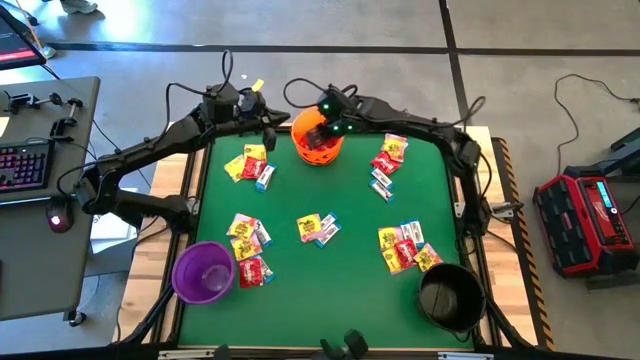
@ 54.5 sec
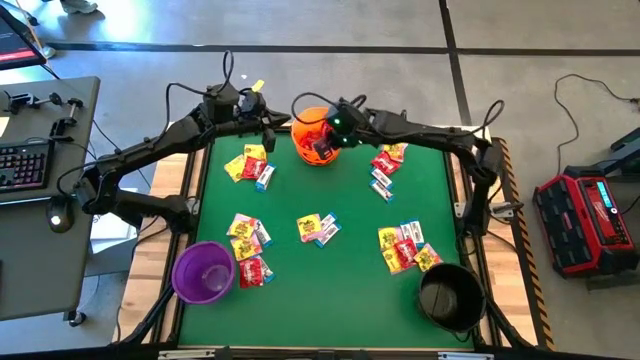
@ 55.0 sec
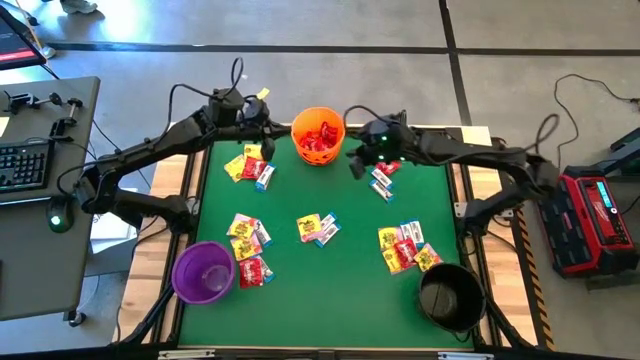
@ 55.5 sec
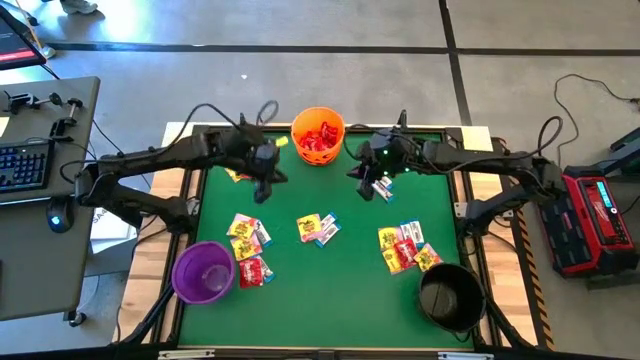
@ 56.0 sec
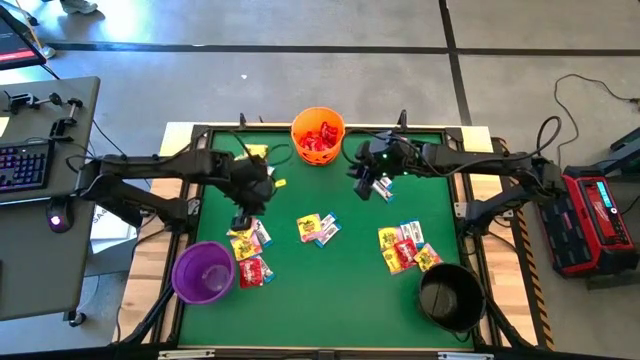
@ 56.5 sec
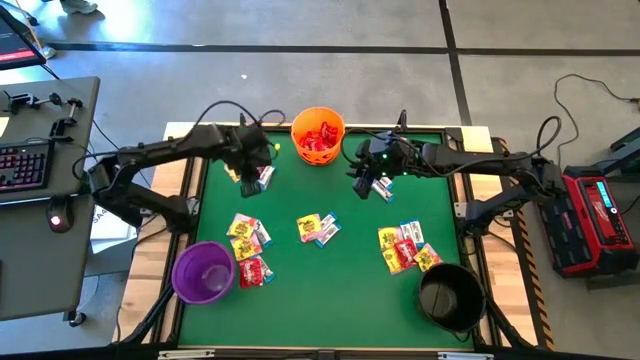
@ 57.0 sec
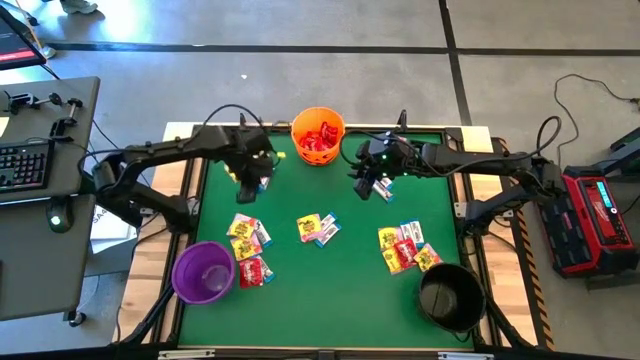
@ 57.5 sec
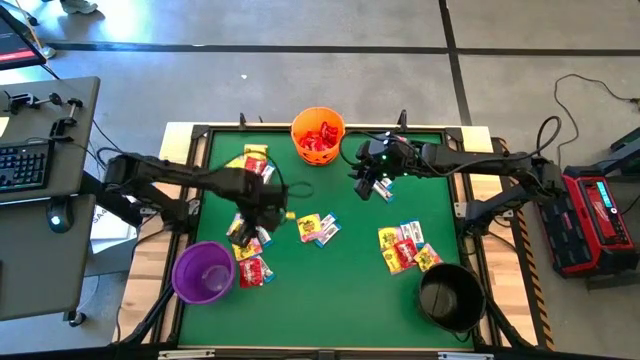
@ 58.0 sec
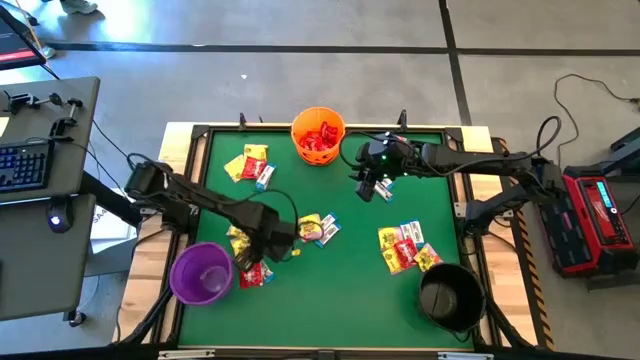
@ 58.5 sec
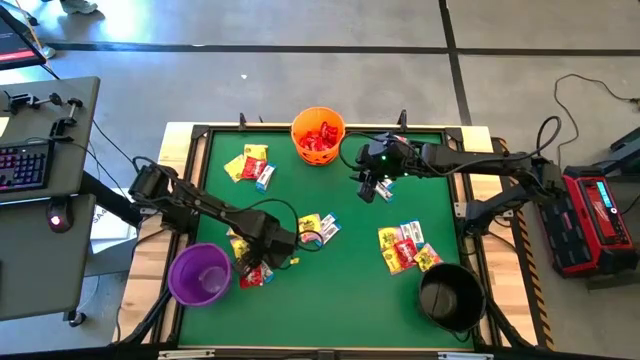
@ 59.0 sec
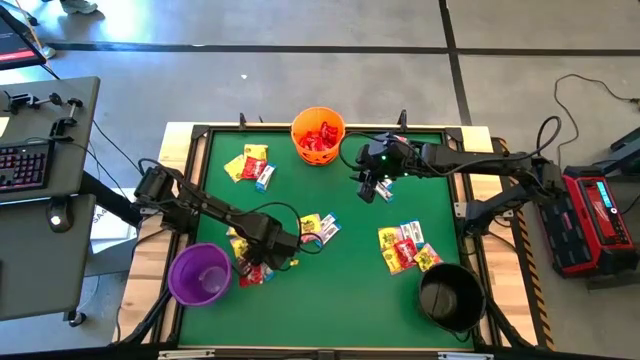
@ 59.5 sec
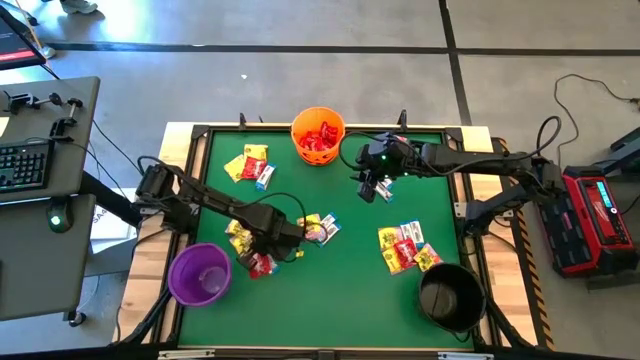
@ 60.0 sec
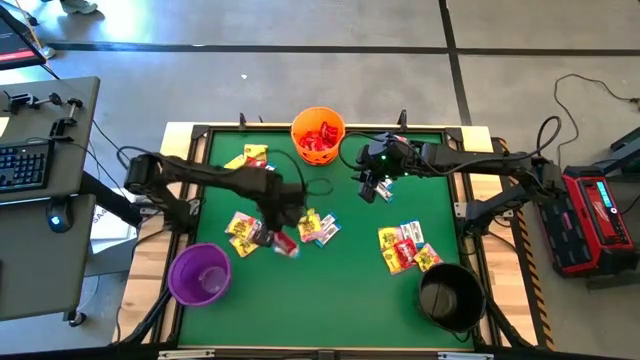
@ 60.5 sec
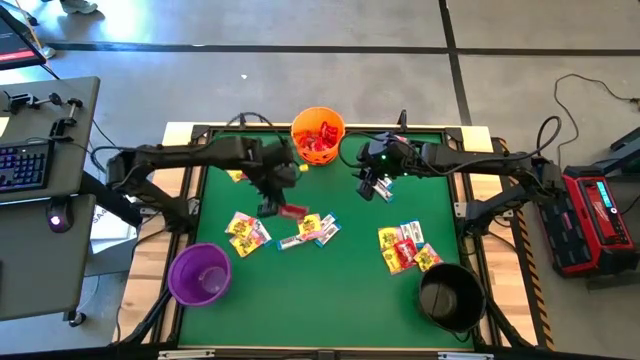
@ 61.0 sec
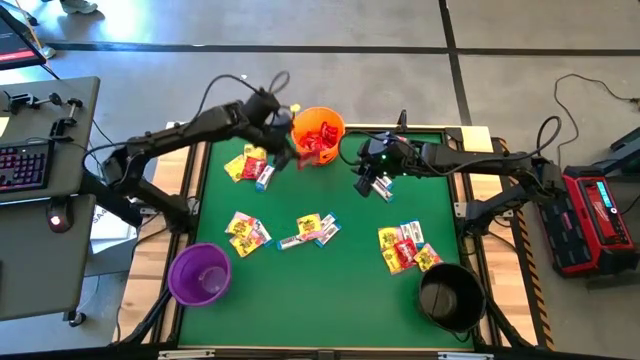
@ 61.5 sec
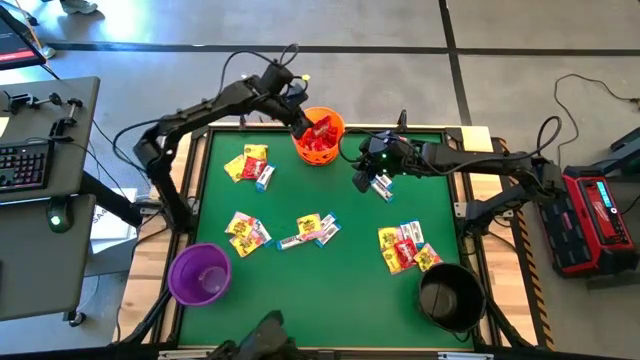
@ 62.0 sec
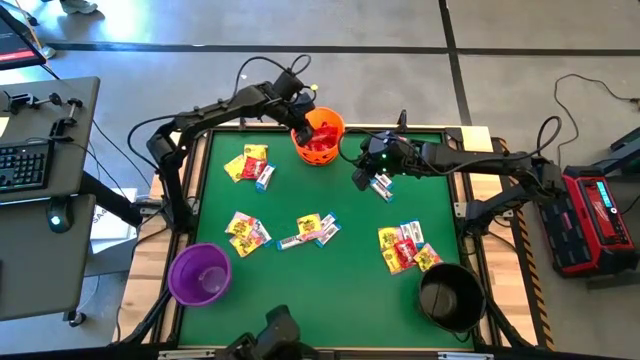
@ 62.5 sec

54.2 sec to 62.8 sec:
Task: Sort candy by brand, put in halloween buckets
Put the red candy into the orange bucket

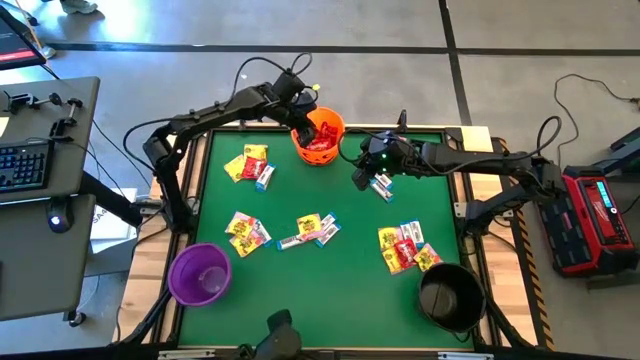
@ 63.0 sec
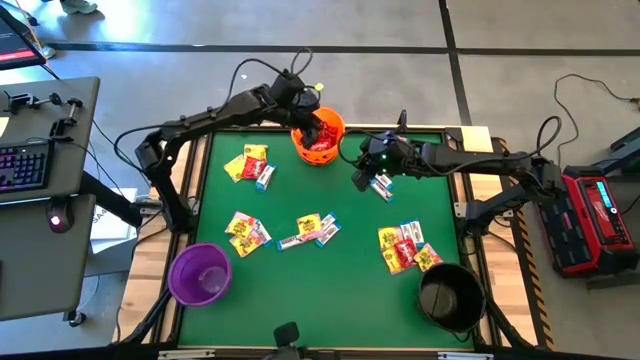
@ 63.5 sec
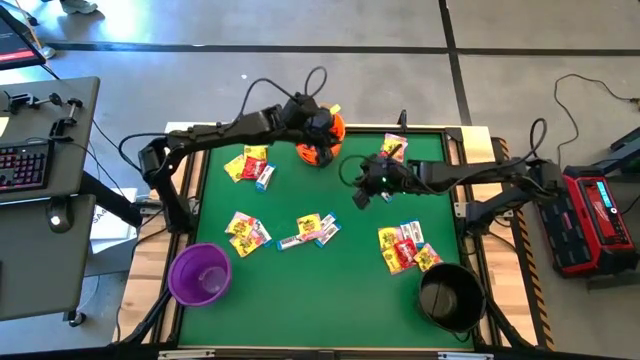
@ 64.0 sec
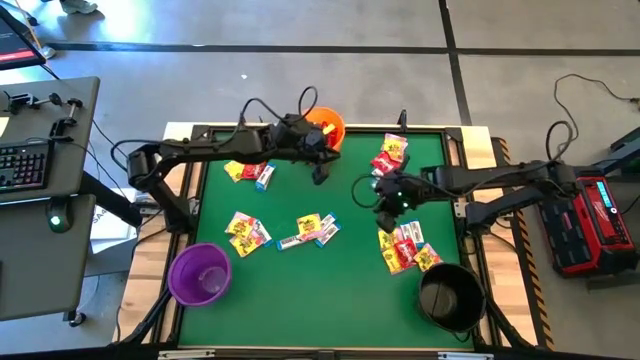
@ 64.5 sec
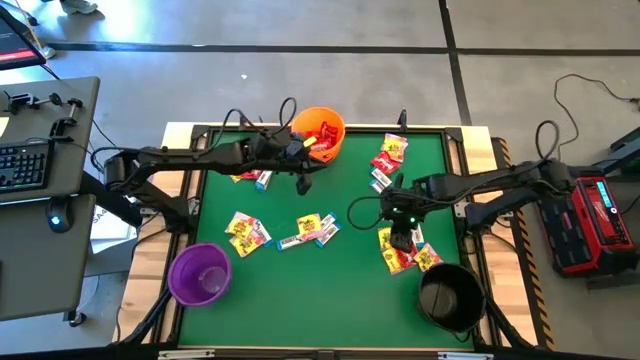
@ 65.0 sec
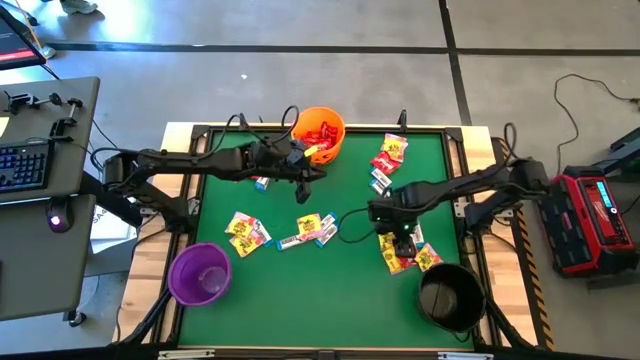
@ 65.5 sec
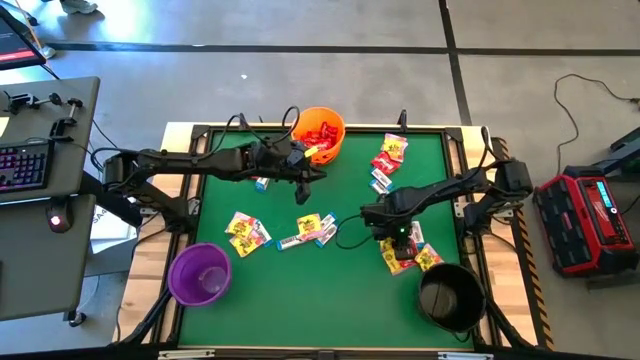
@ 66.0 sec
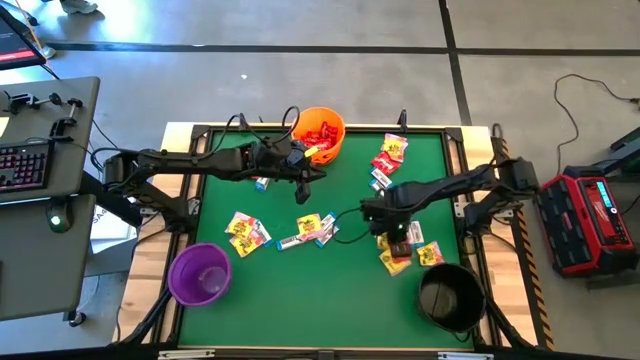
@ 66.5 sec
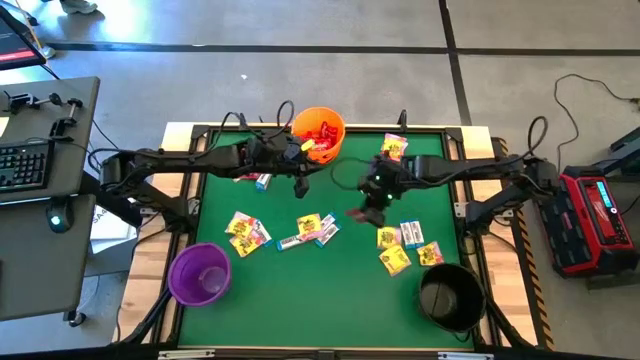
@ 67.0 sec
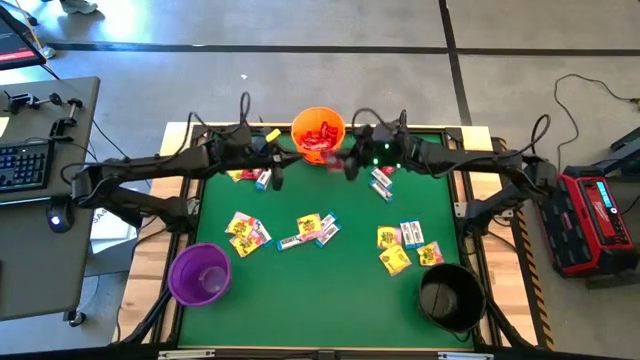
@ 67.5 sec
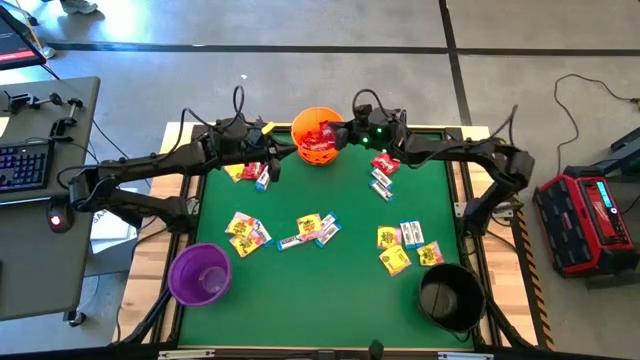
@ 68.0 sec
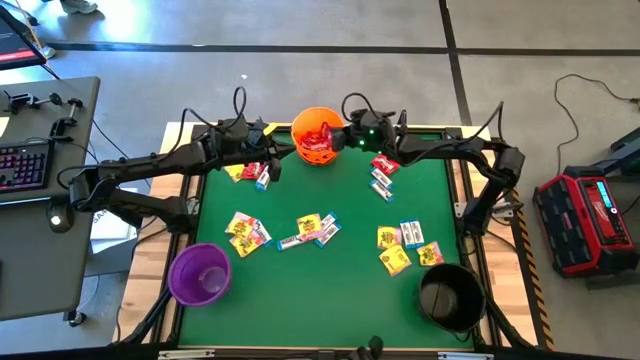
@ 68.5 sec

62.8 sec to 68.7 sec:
Put the red candy into the orange bucket

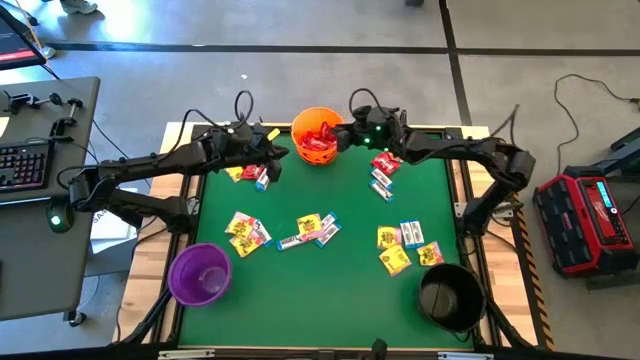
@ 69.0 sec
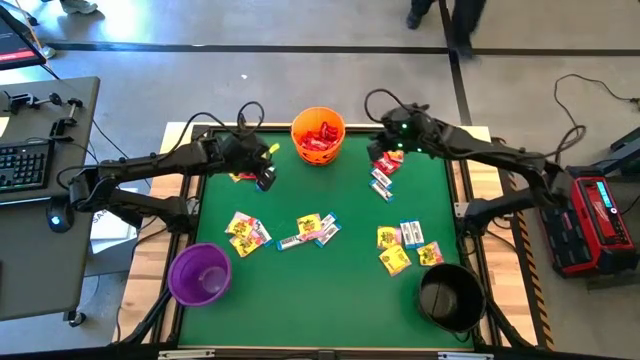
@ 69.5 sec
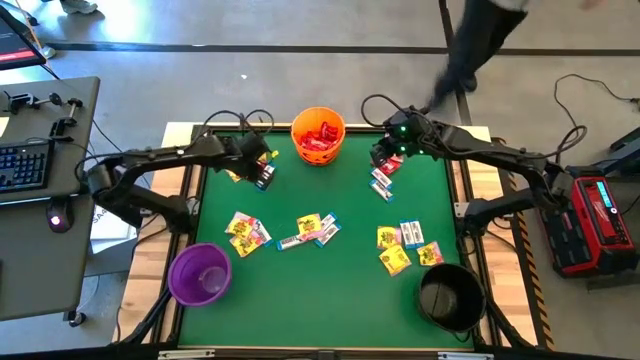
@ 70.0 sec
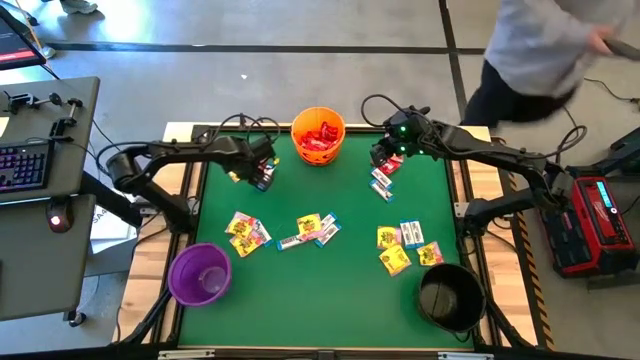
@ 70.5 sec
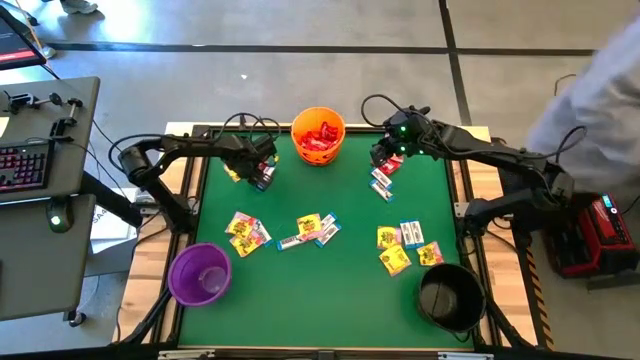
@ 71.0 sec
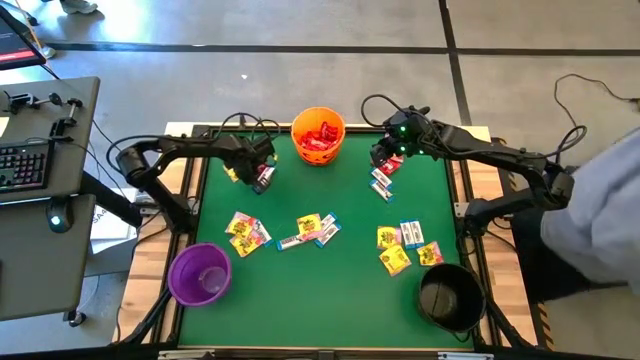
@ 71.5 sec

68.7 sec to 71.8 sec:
Put the red candy into the orange bucket

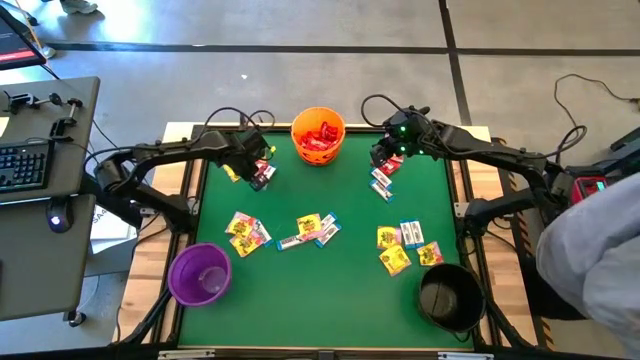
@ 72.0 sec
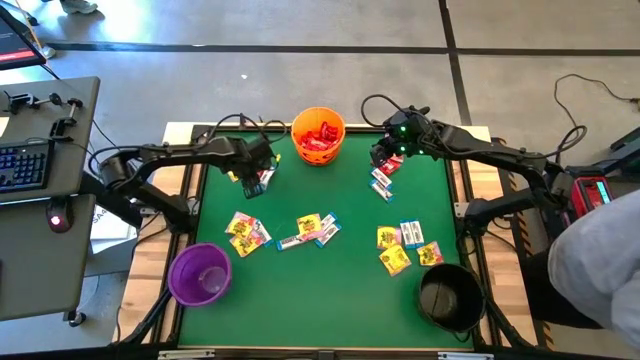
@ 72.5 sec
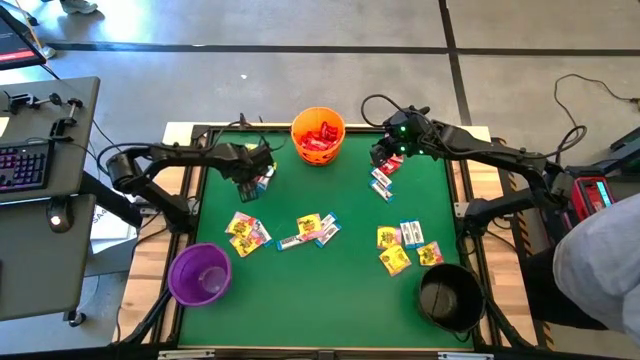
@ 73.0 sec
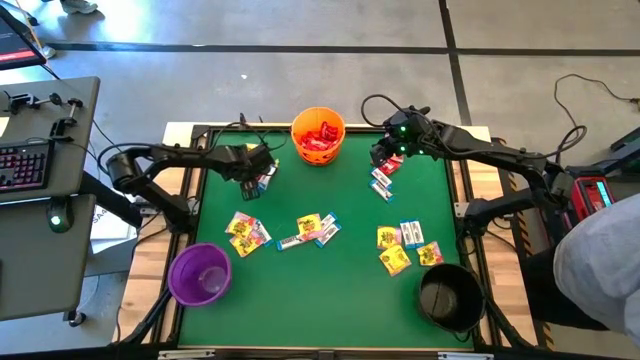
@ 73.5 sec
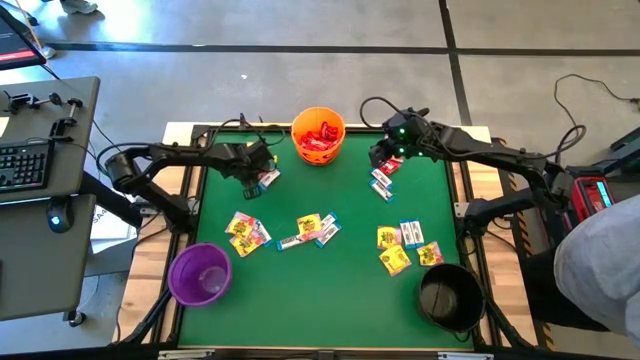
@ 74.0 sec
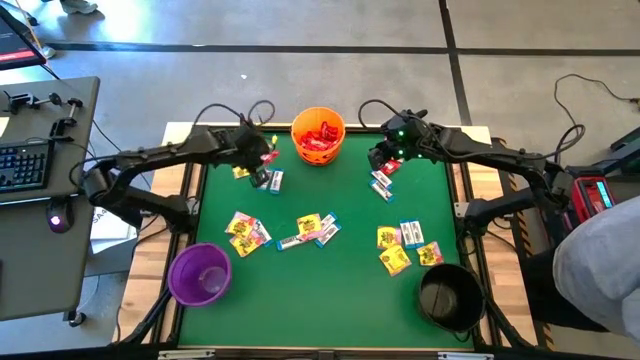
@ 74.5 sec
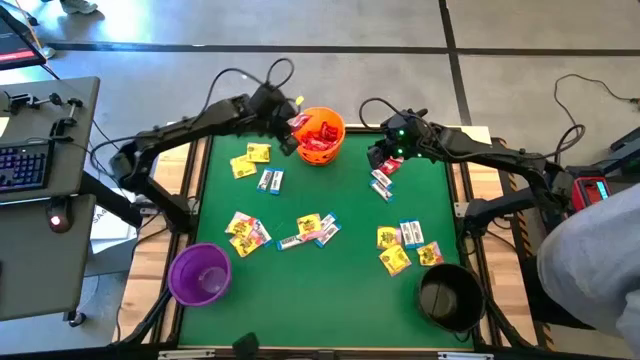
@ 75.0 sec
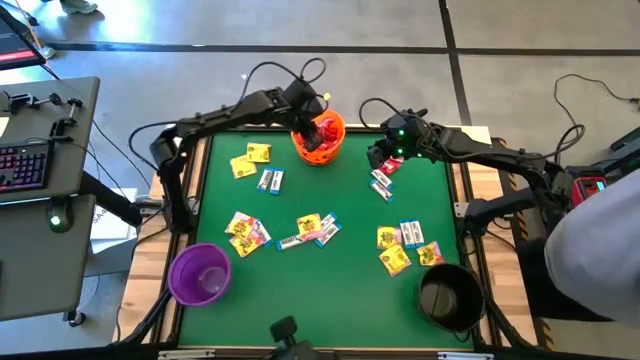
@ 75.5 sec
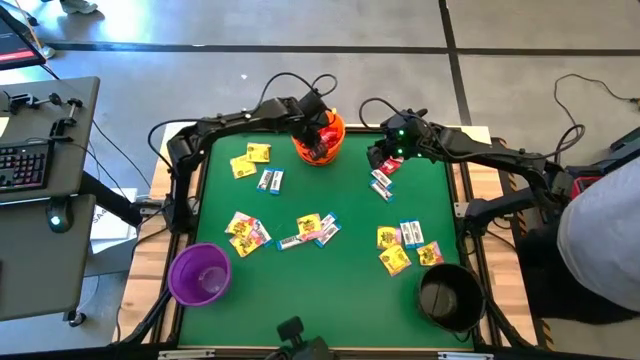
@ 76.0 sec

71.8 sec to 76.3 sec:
Put the red candy into the orange bucket

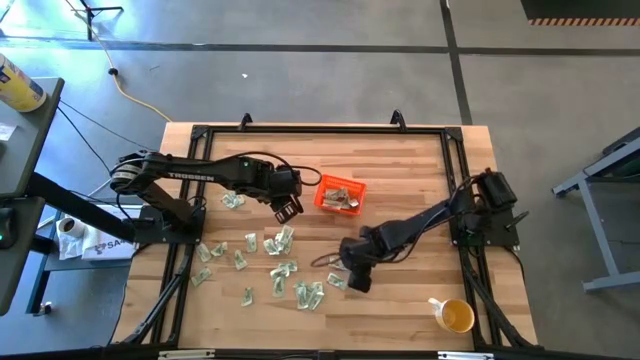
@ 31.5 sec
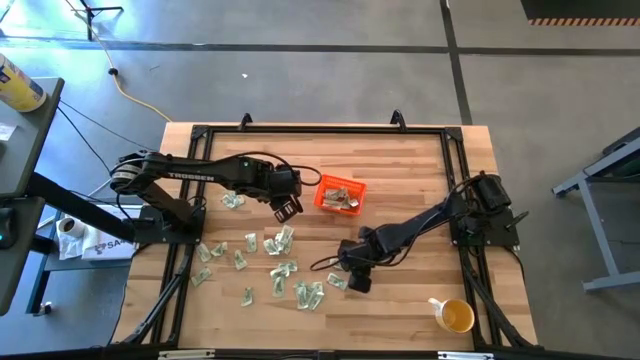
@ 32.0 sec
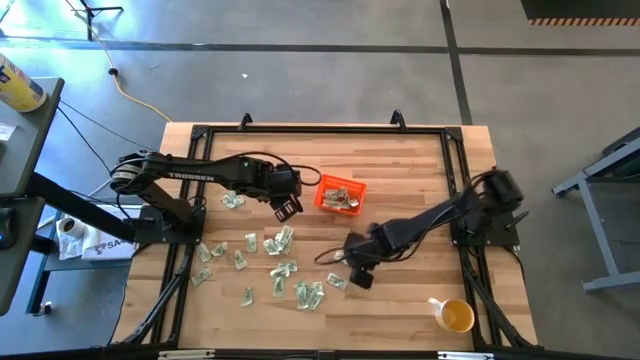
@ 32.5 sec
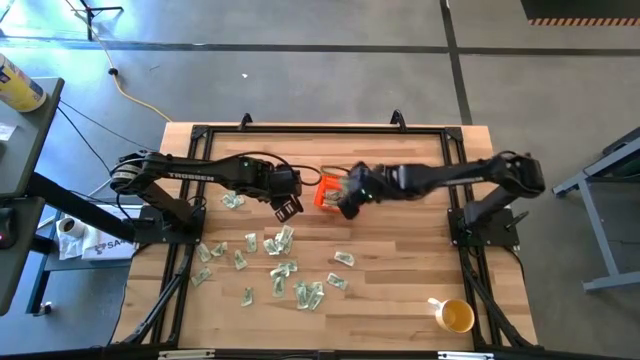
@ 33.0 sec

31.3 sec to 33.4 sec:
Task: Pick and place Stevia / Truvia into bins
Put the green stevia packet into the orange basket
